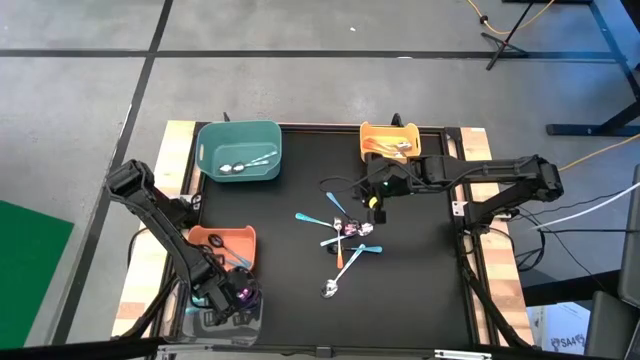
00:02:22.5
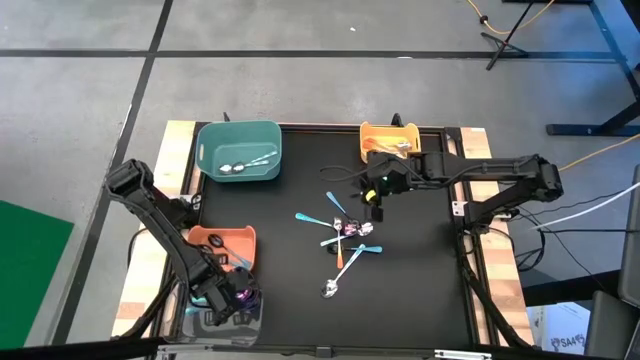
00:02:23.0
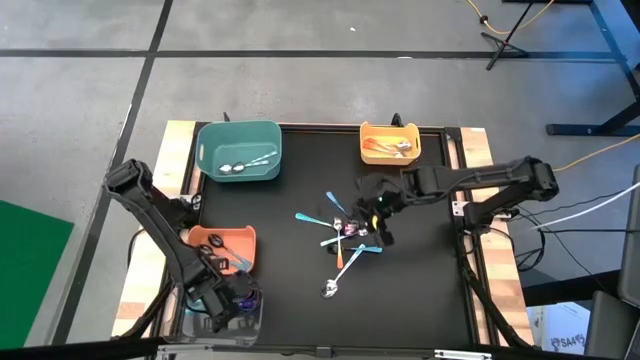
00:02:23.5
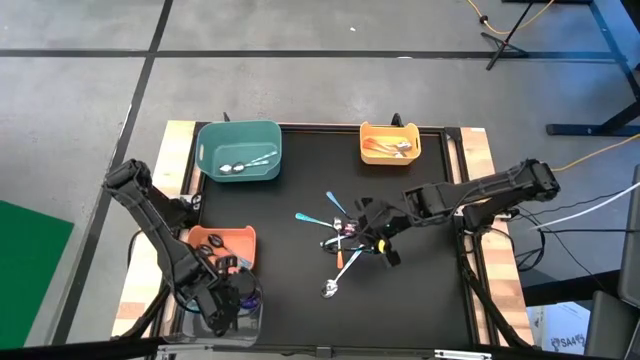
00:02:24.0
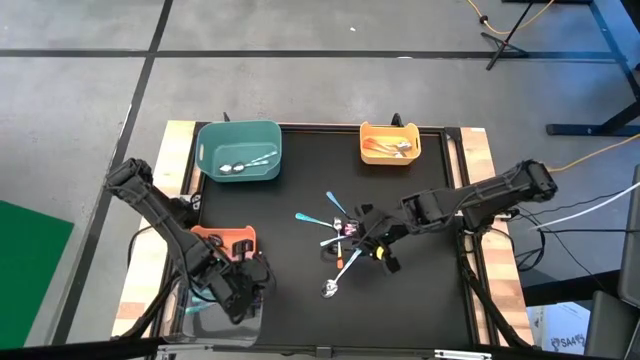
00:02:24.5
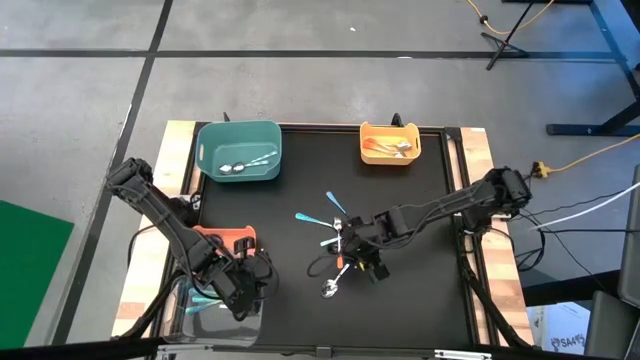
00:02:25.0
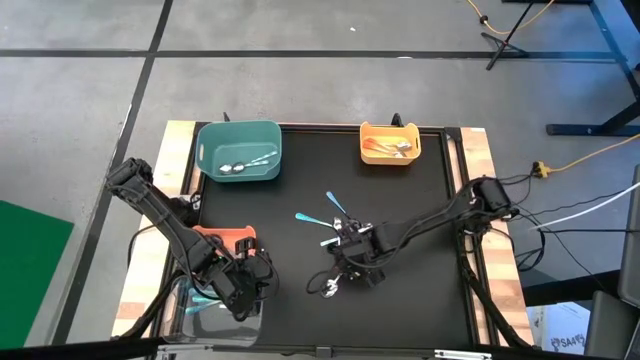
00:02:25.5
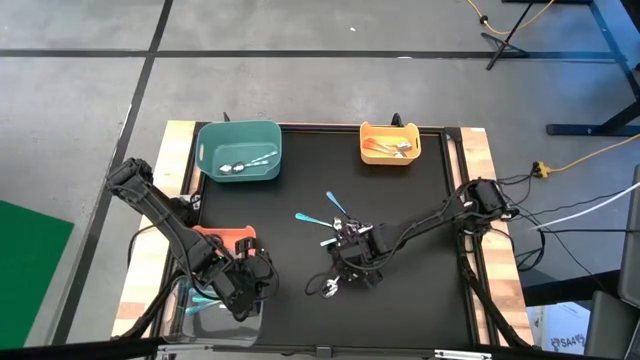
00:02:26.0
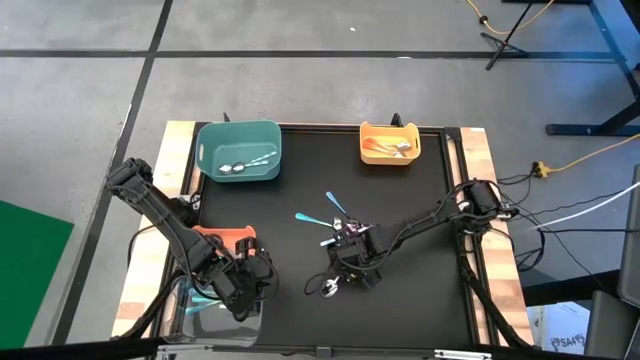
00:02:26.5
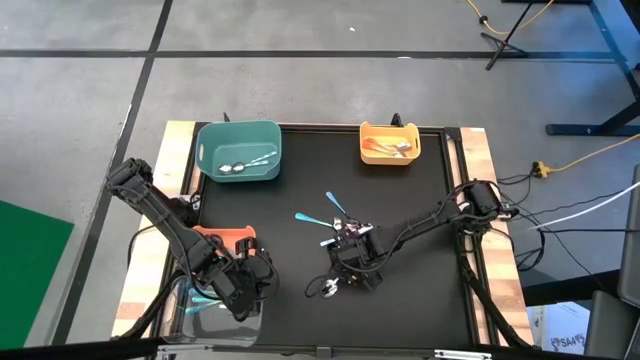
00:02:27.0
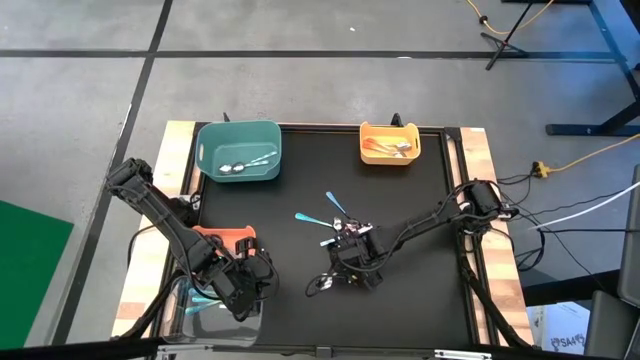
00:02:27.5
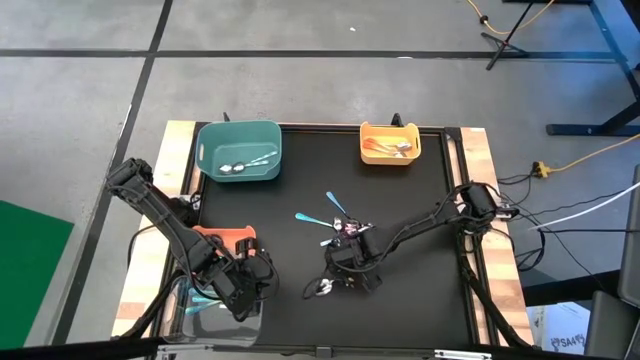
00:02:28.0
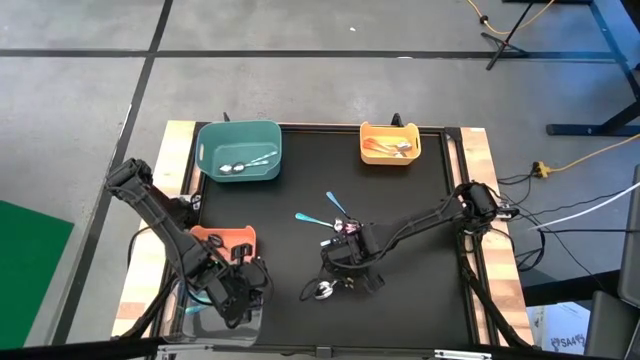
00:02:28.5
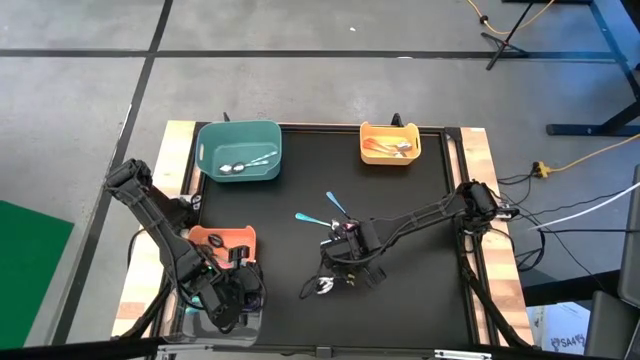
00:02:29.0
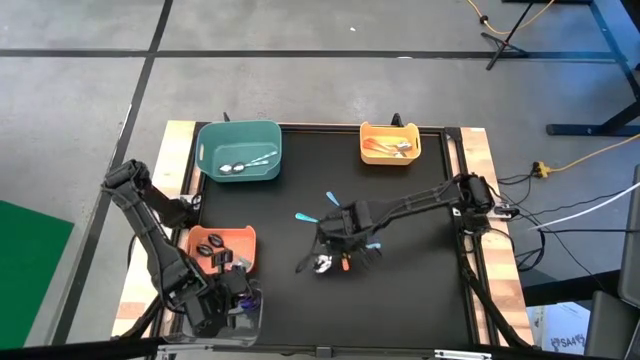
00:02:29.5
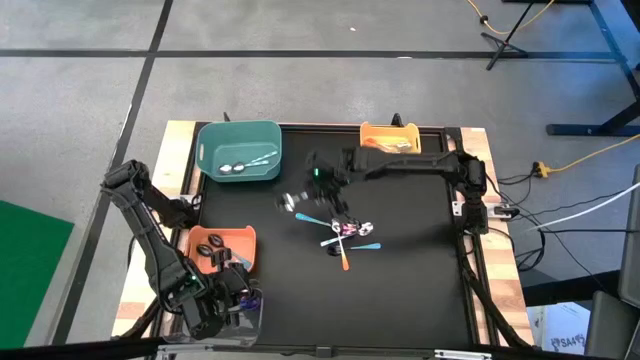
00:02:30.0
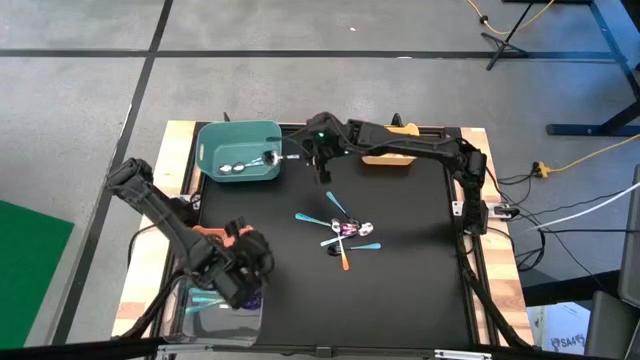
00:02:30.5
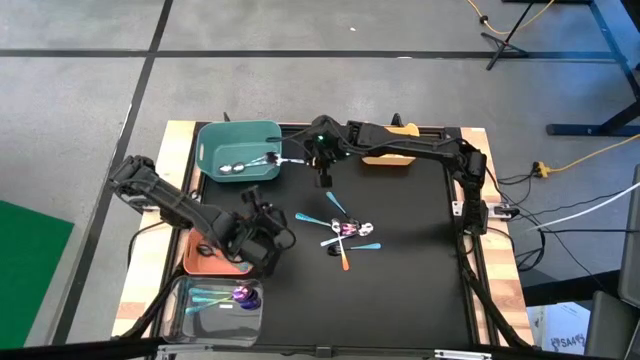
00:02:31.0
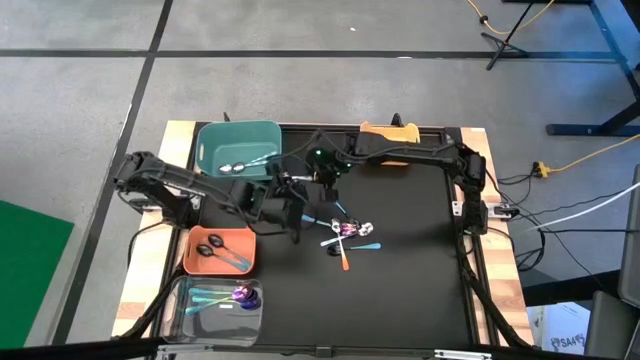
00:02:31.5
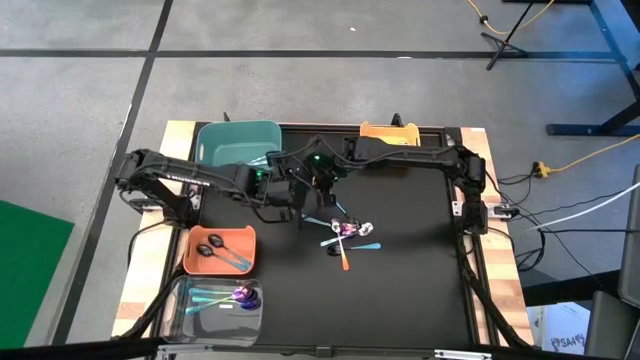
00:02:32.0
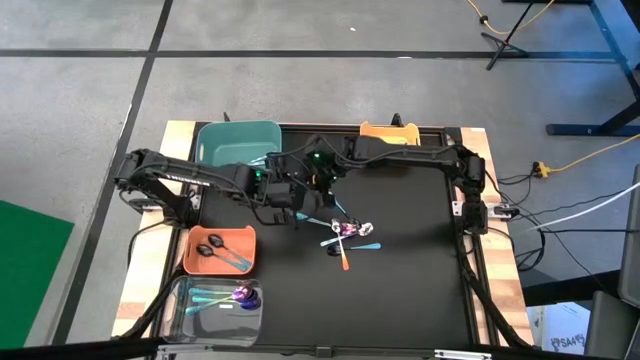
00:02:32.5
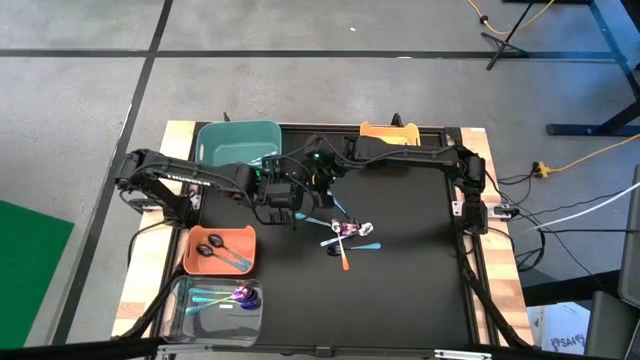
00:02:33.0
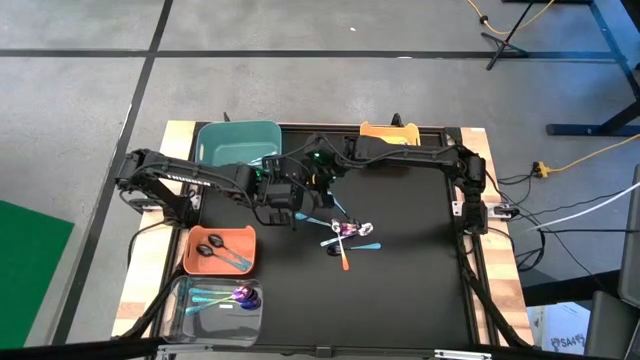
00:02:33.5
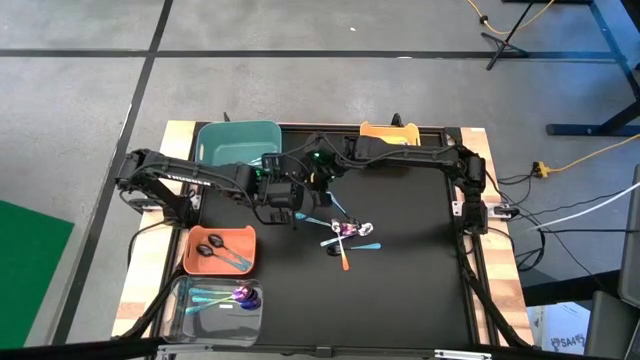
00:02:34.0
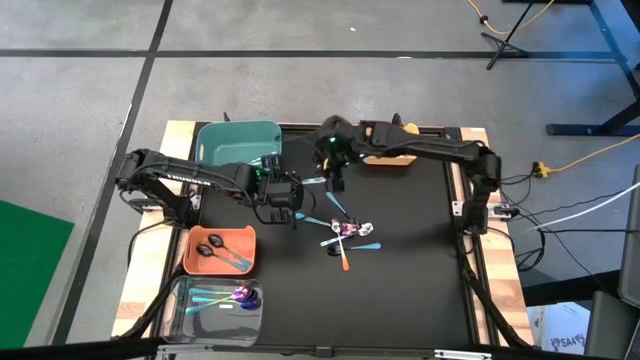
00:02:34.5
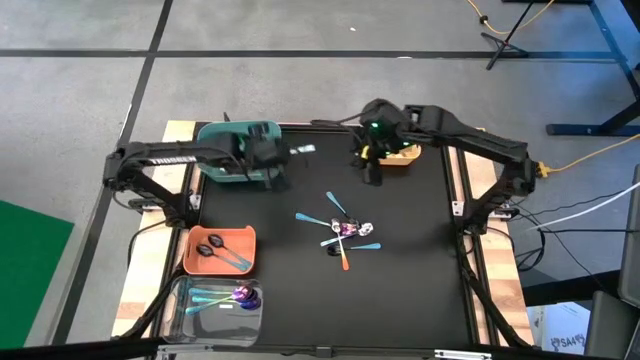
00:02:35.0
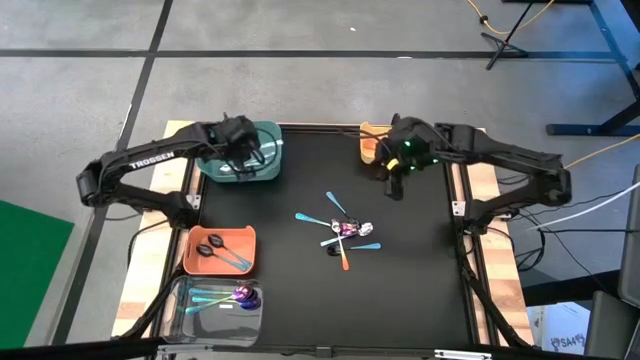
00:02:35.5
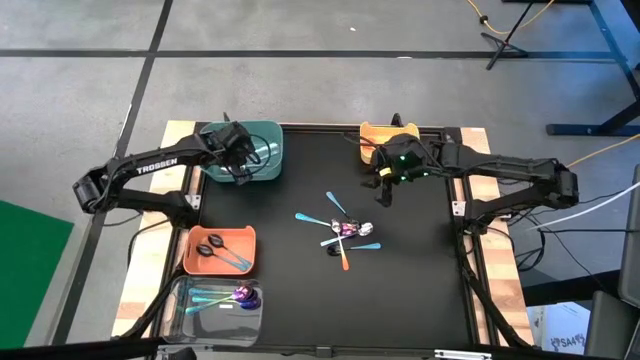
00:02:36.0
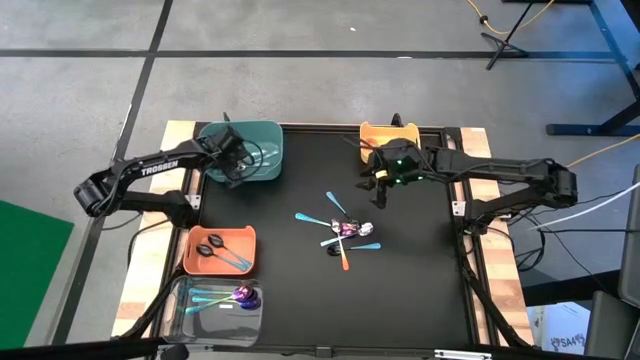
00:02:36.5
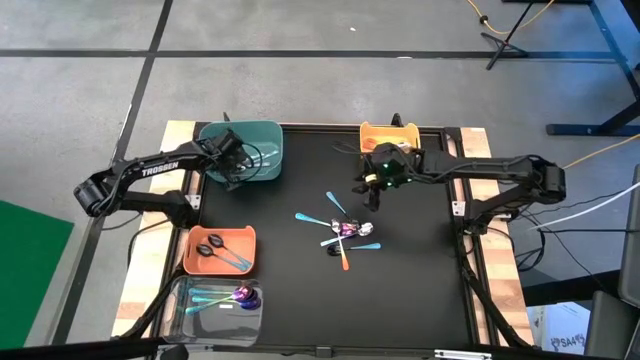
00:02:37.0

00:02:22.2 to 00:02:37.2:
Task: Sort silverware by color (type)
Put the blue spoon into the blue bin

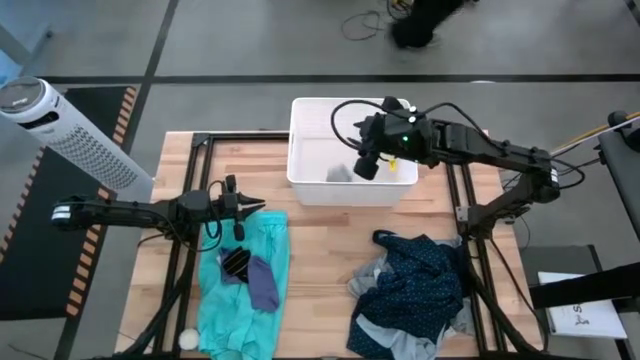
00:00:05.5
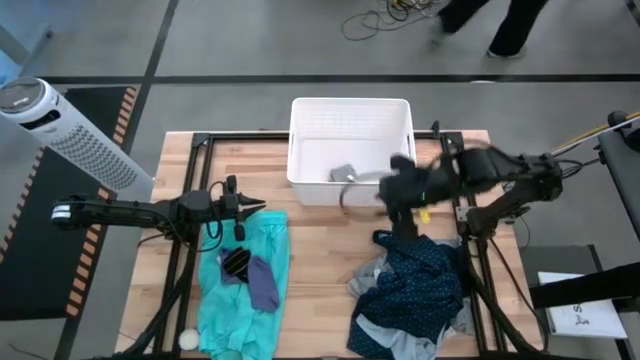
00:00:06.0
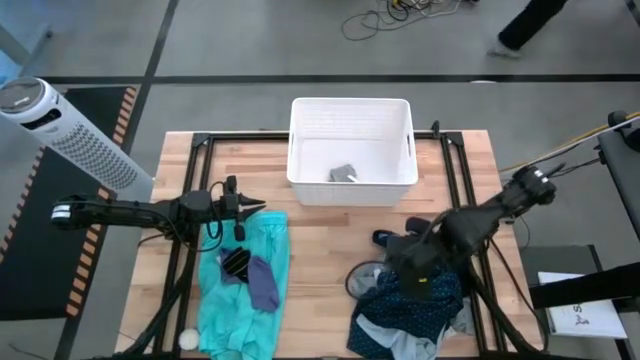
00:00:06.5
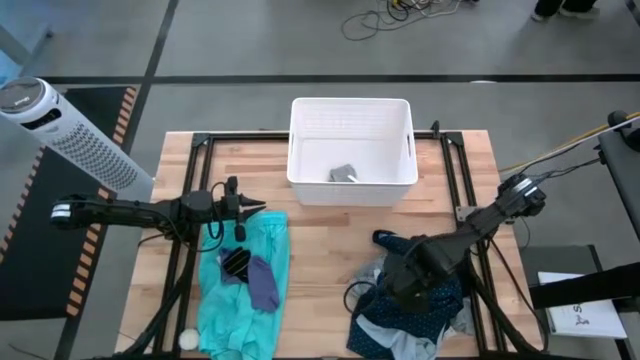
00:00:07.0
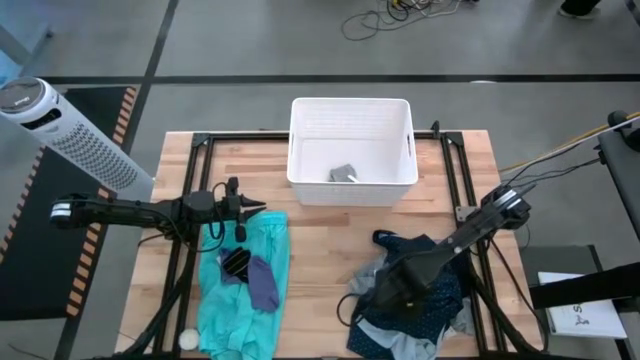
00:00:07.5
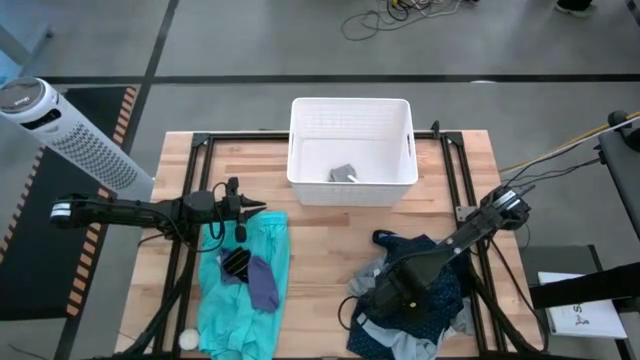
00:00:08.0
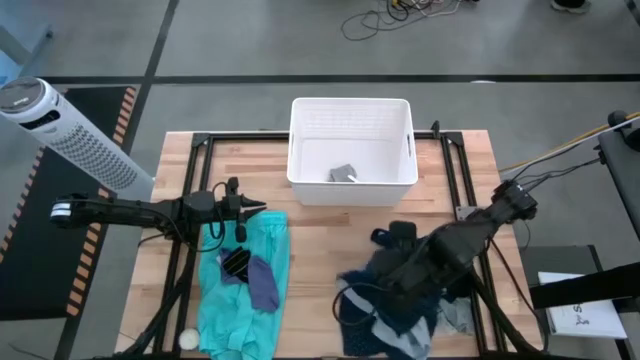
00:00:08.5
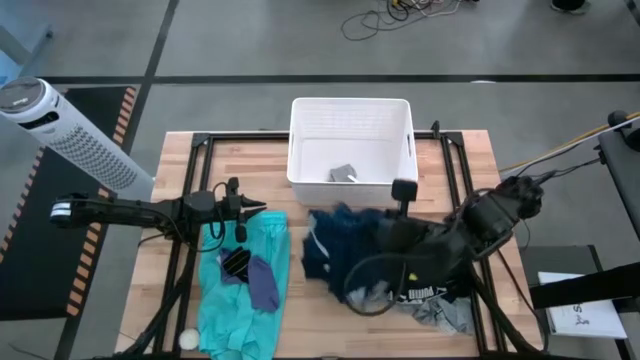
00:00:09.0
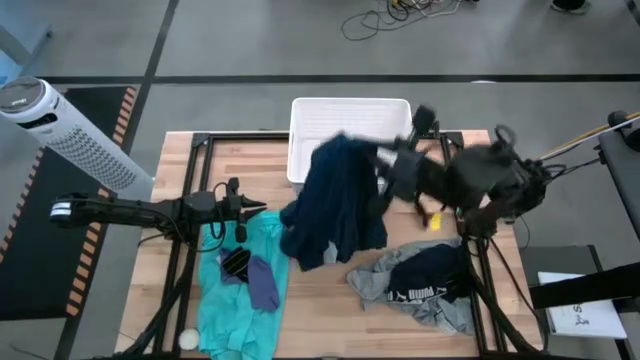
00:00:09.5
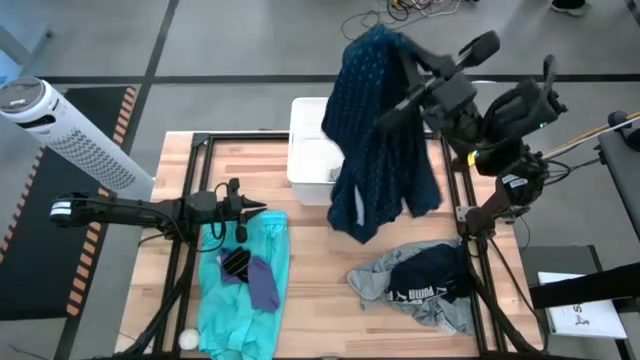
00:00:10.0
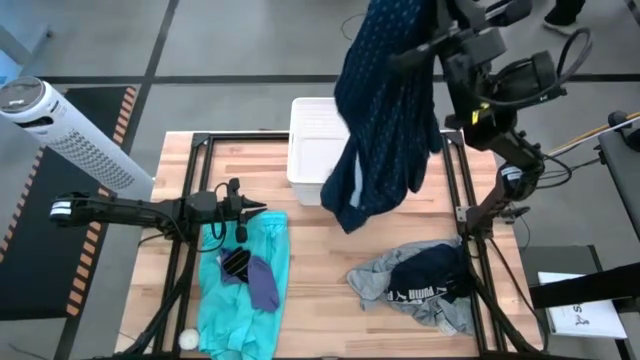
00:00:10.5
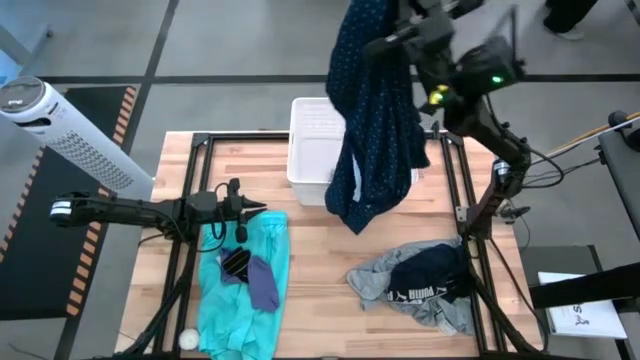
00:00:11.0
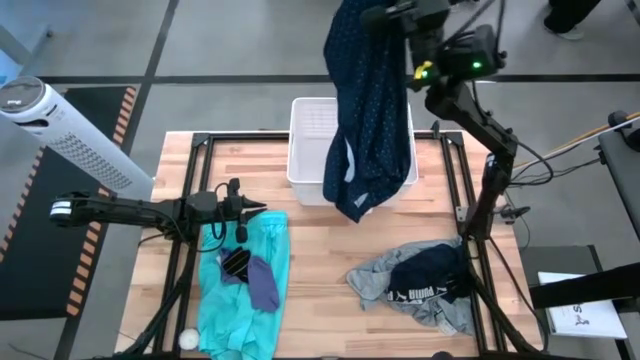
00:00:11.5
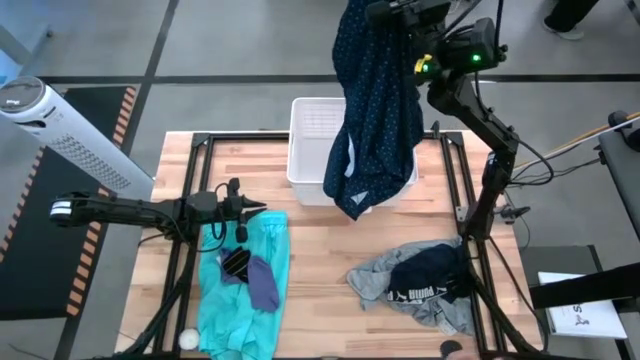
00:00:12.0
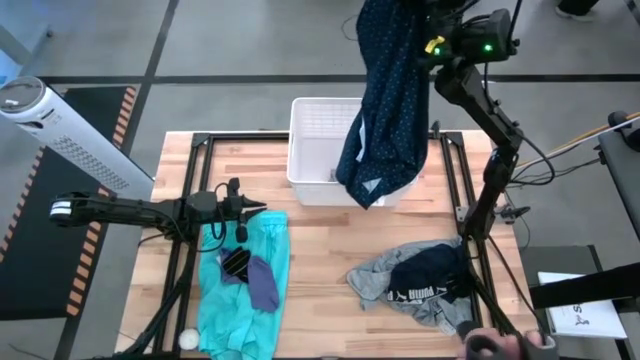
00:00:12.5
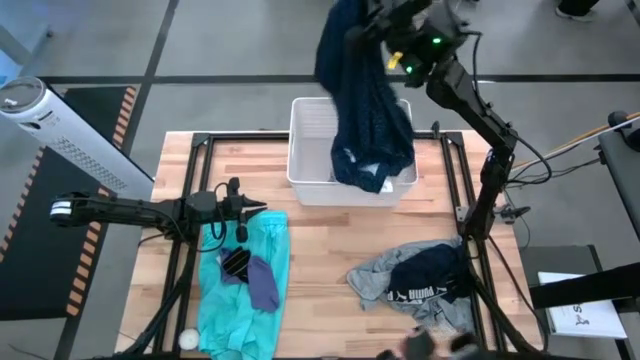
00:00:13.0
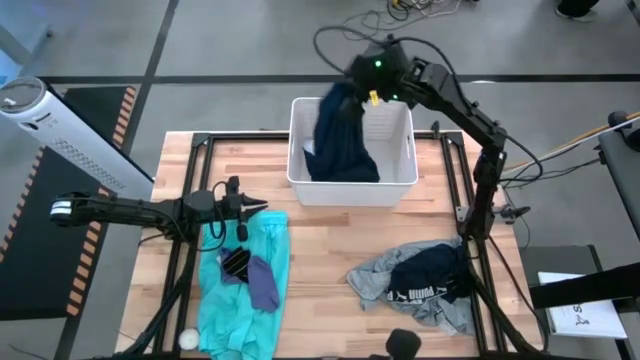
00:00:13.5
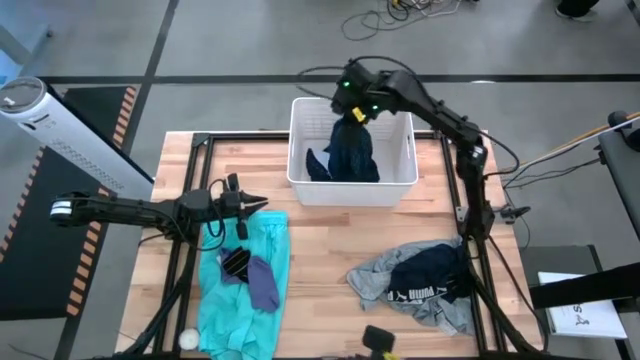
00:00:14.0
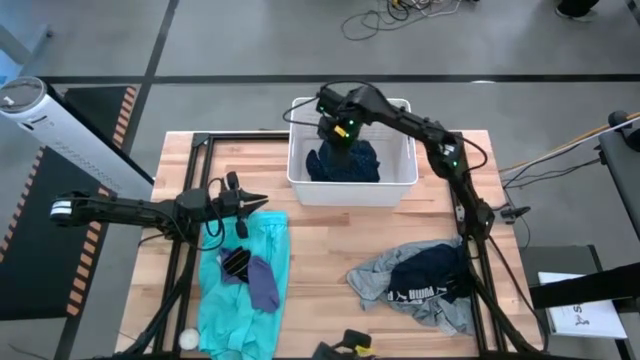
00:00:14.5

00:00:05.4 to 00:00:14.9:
Task: Sort clothes
Put the blue polo shirt into the laundry bin
